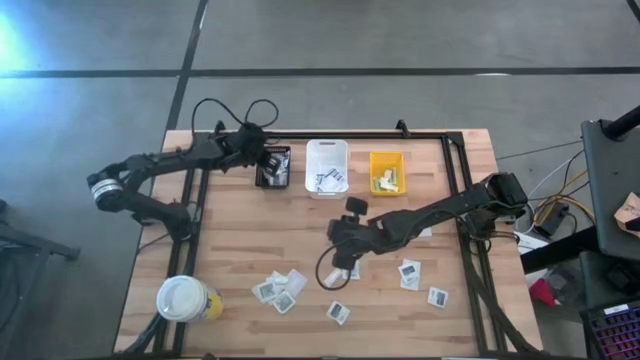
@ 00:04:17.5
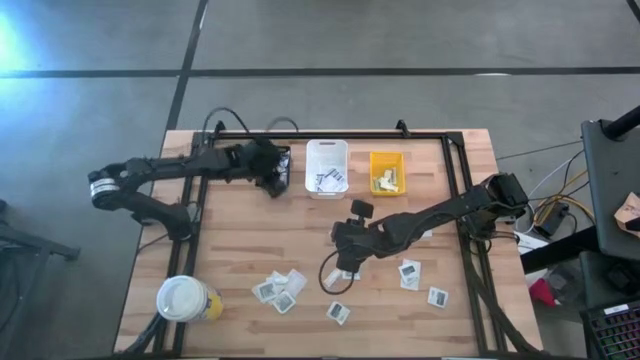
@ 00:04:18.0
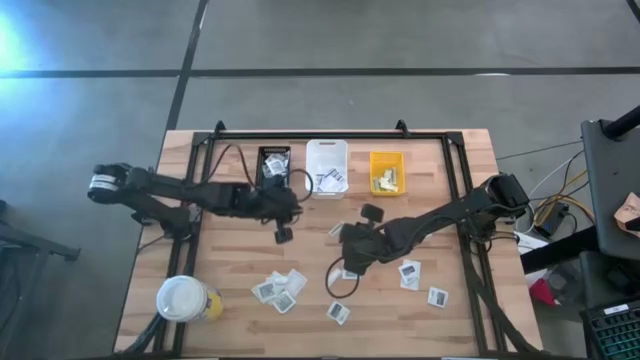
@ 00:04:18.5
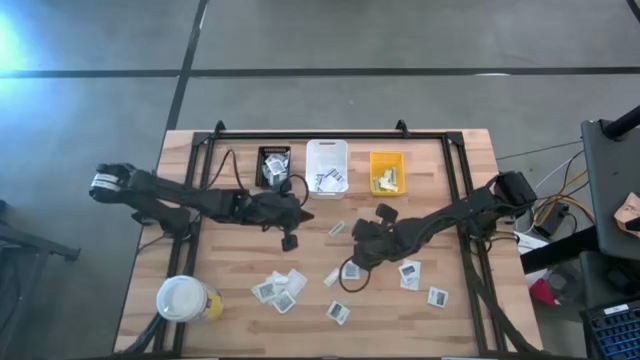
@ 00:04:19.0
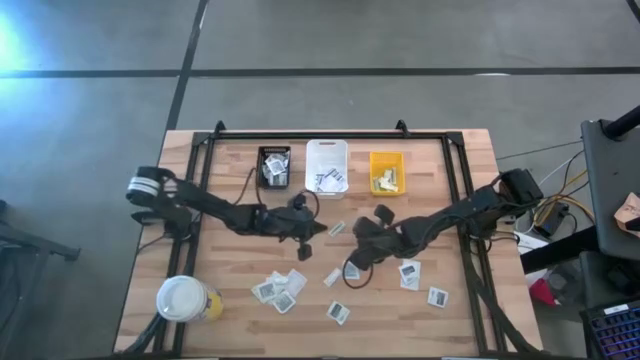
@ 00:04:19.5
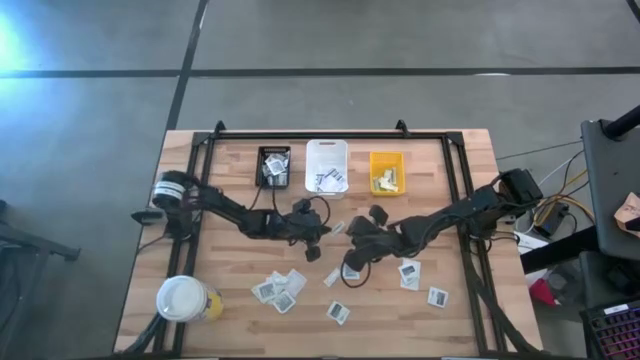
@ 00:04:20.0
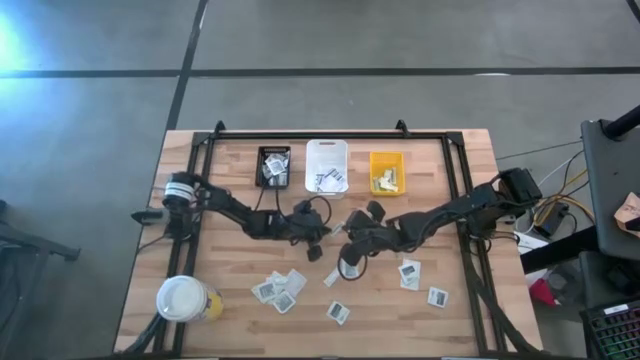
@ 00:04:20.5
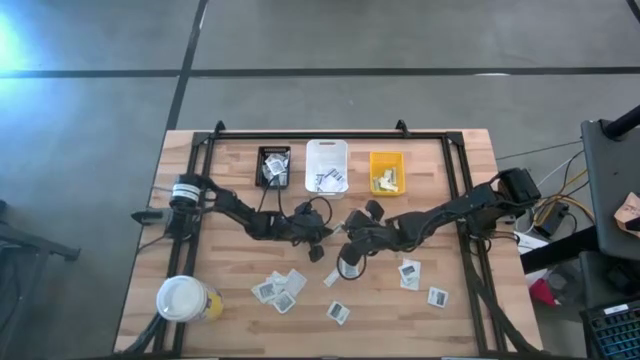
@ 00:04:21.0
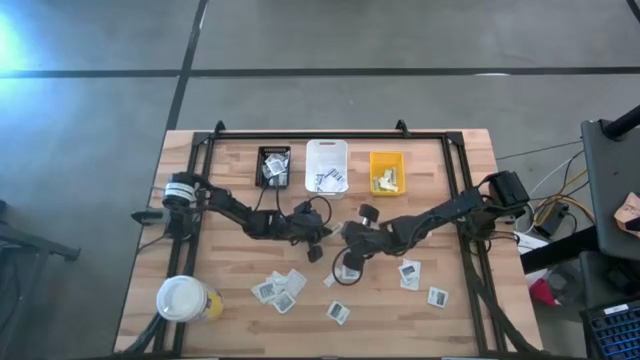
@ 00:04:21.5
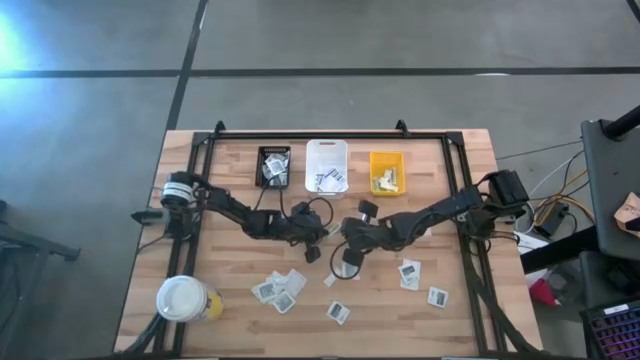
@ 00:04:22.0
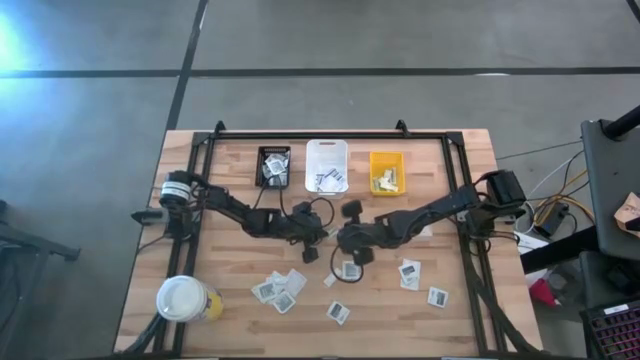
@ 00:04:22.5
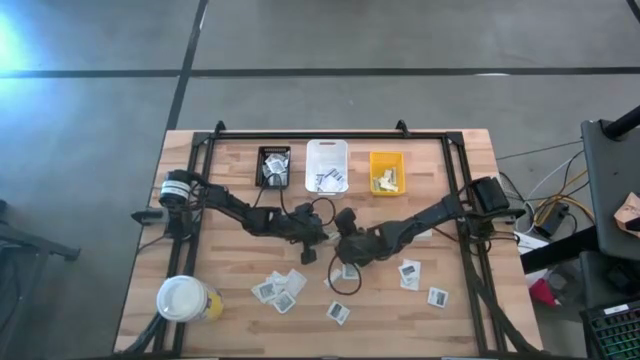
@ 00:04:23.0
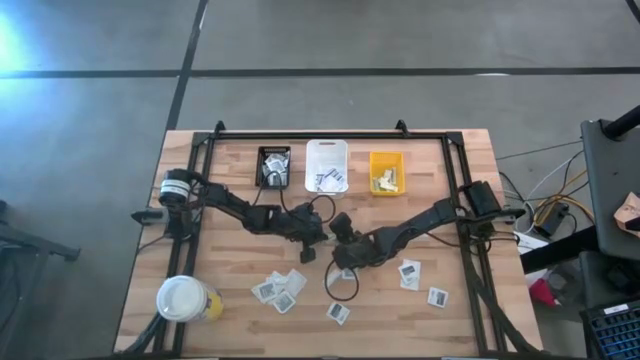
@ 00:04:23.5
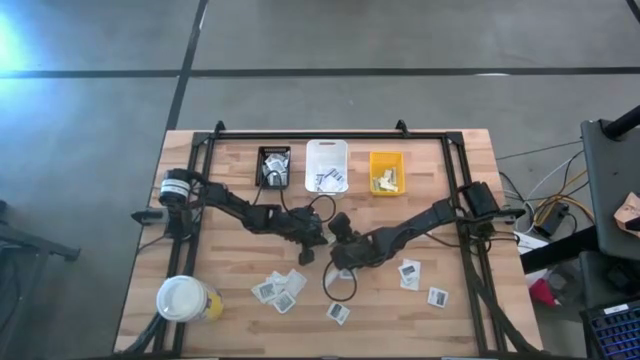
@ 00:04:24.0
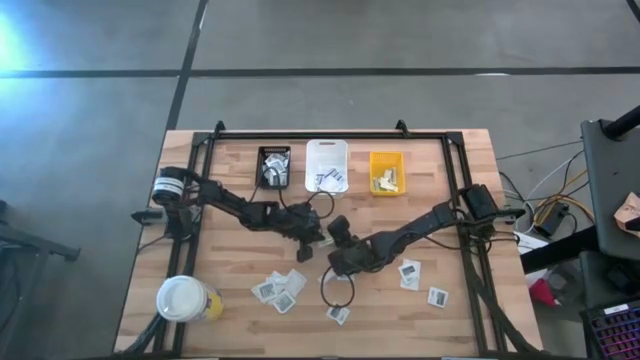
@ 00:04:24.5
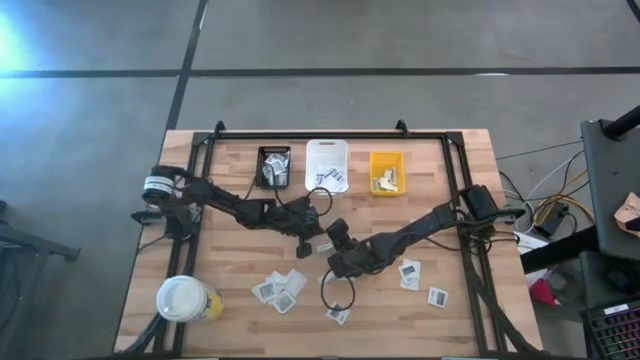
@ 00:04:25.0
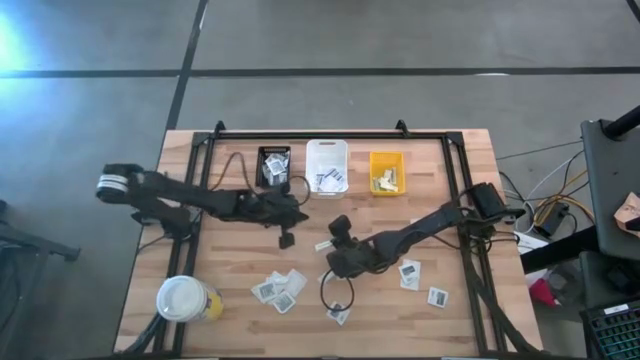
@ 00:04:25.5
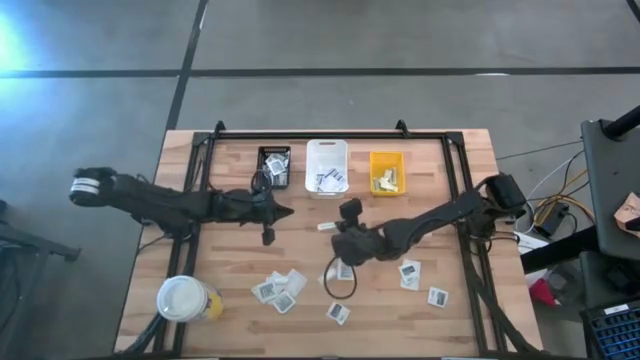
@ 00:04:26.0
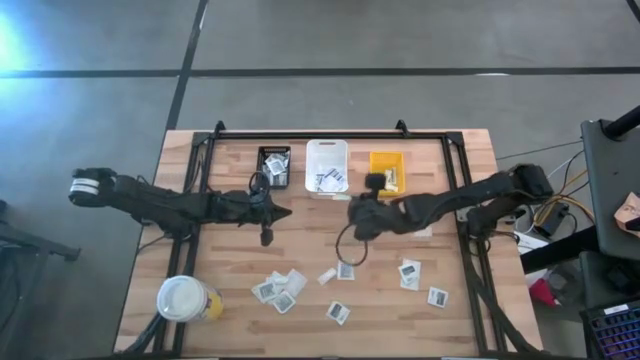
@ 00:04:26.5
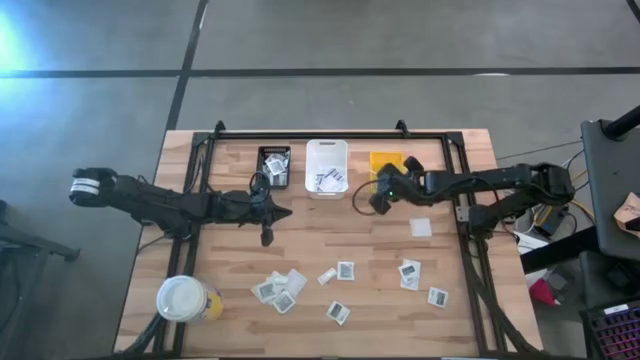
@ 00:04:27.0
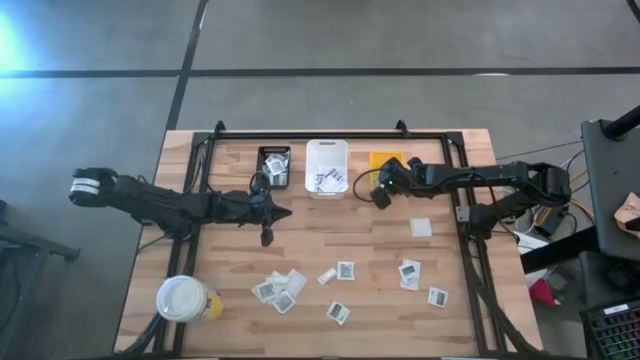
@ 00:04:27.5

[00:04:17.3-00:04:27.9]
Task: Pick & Place First Aid Supplies
Put the green bandage into the yellow basket

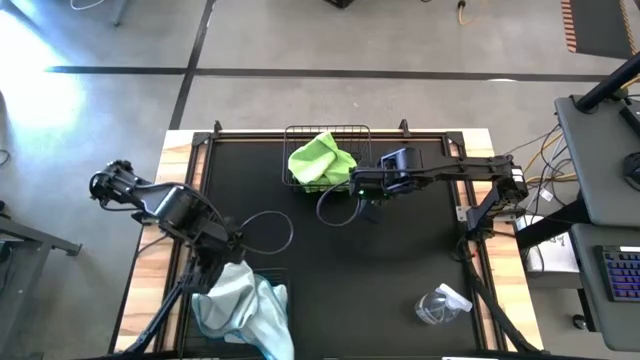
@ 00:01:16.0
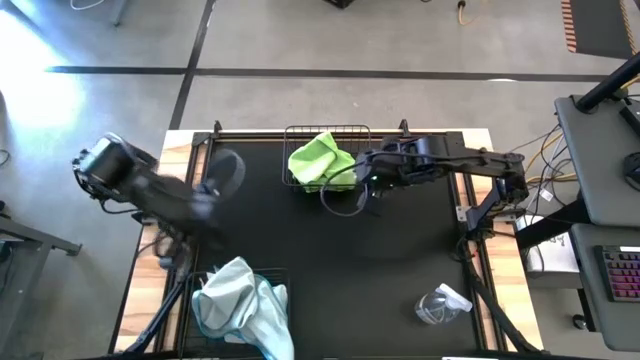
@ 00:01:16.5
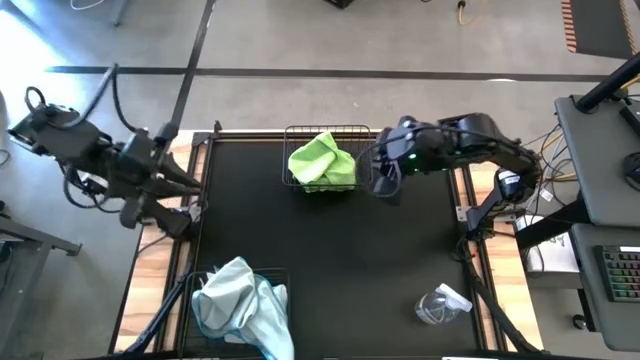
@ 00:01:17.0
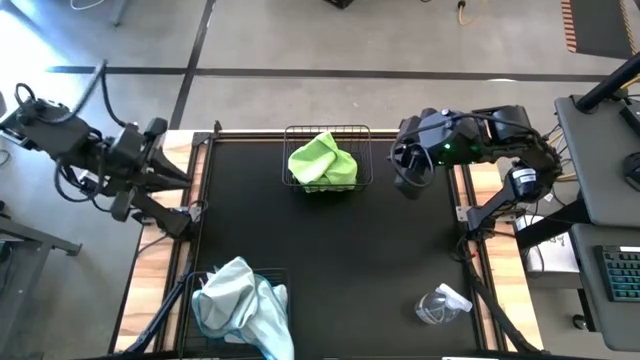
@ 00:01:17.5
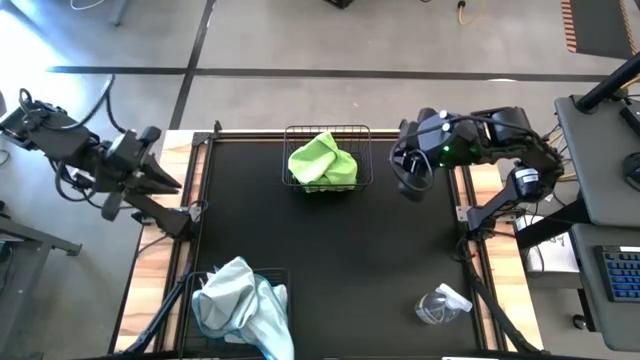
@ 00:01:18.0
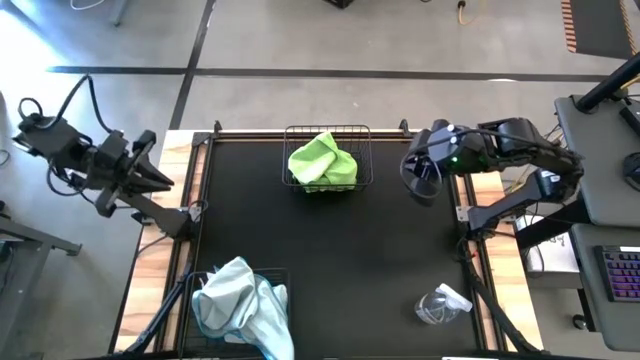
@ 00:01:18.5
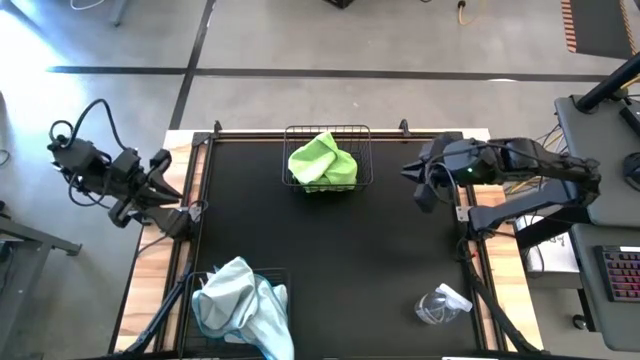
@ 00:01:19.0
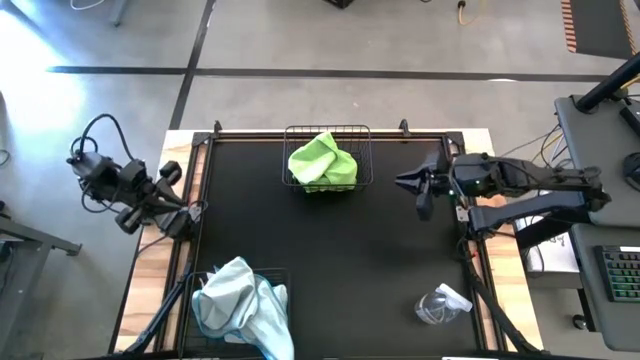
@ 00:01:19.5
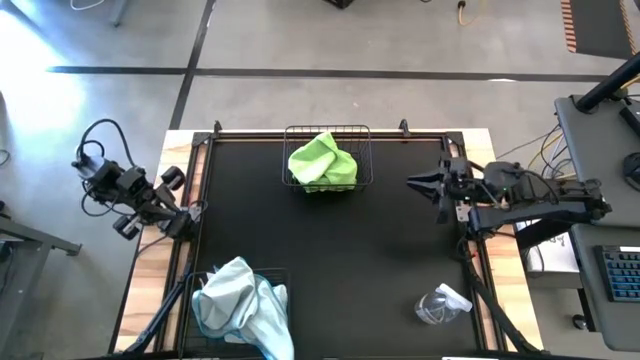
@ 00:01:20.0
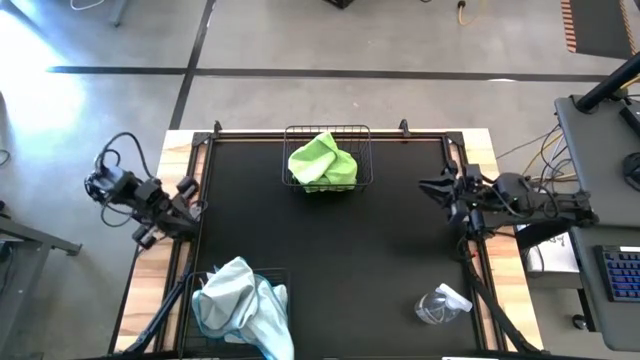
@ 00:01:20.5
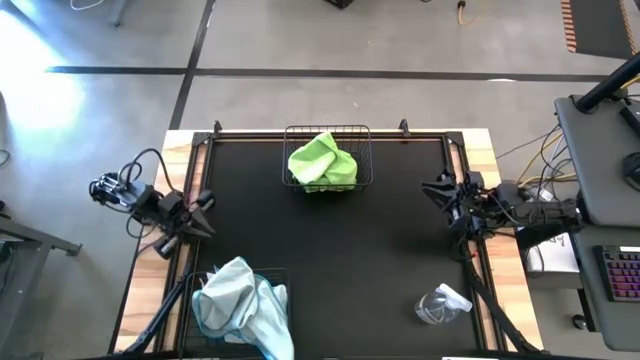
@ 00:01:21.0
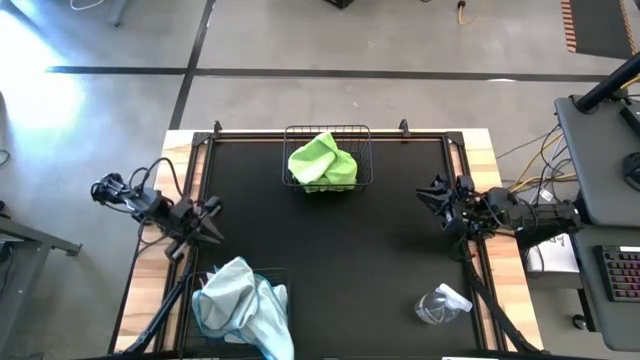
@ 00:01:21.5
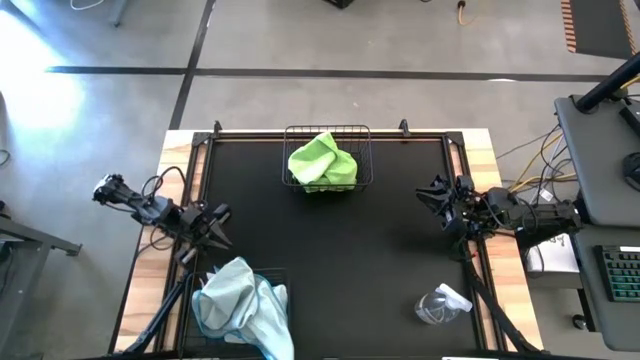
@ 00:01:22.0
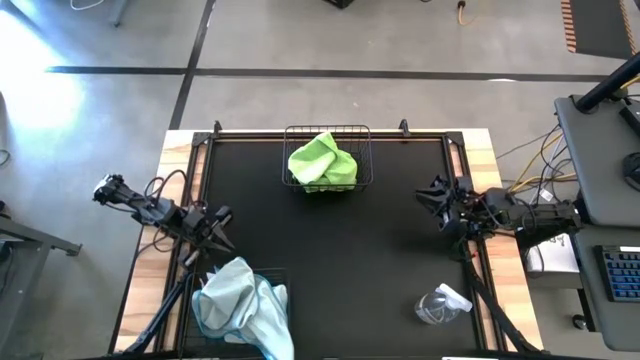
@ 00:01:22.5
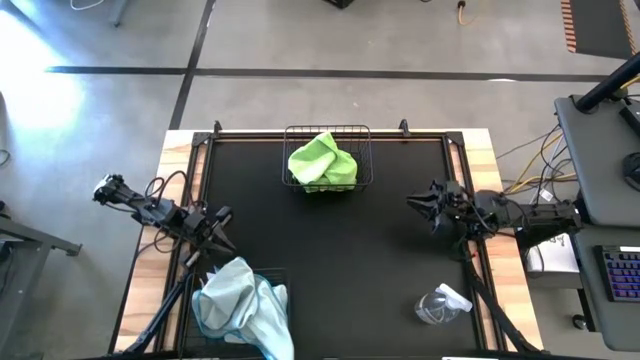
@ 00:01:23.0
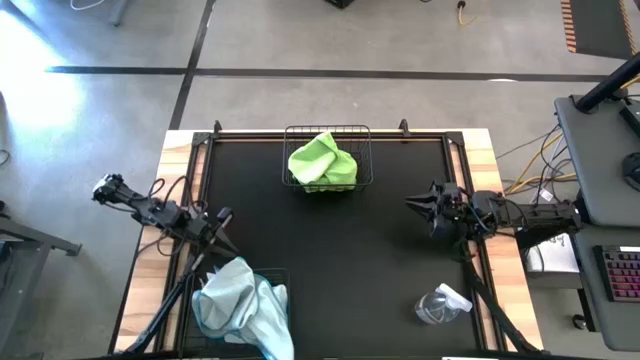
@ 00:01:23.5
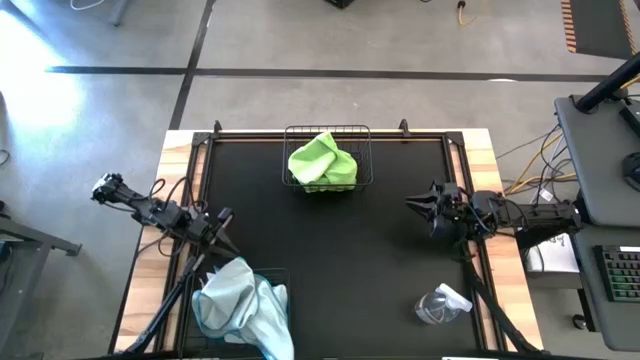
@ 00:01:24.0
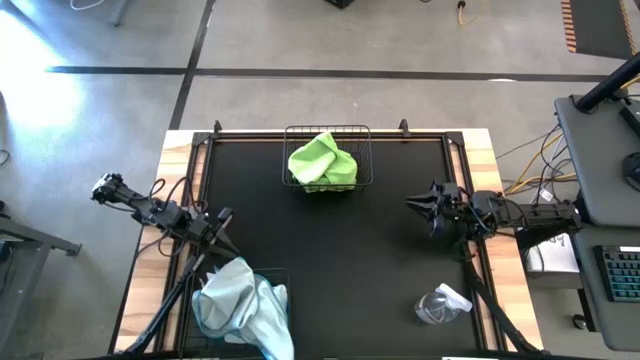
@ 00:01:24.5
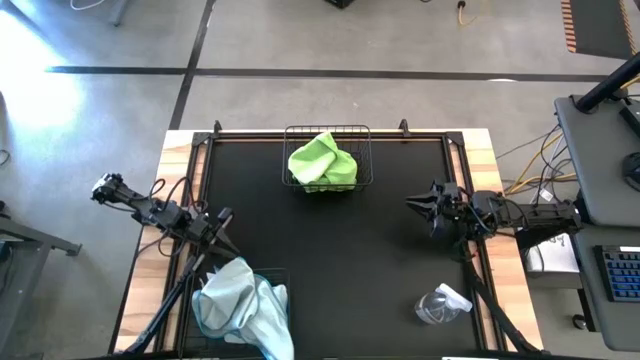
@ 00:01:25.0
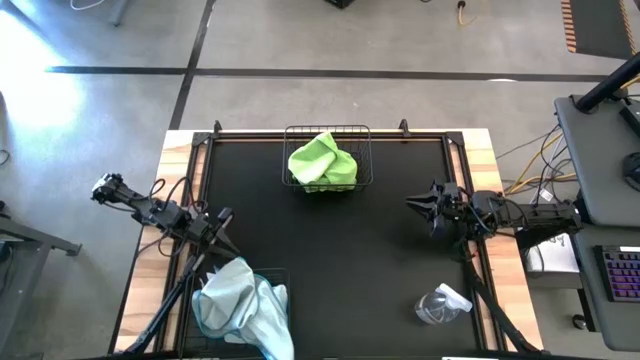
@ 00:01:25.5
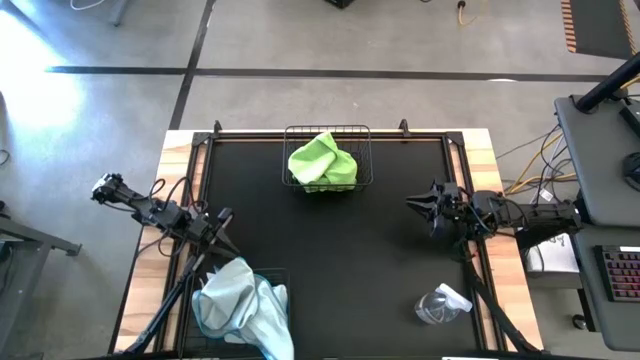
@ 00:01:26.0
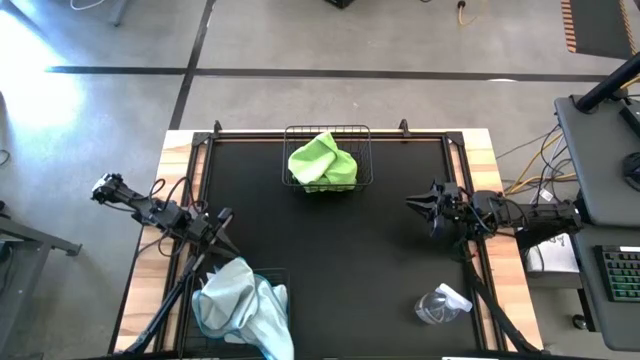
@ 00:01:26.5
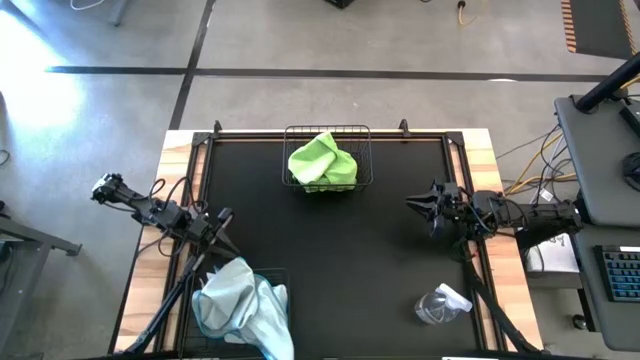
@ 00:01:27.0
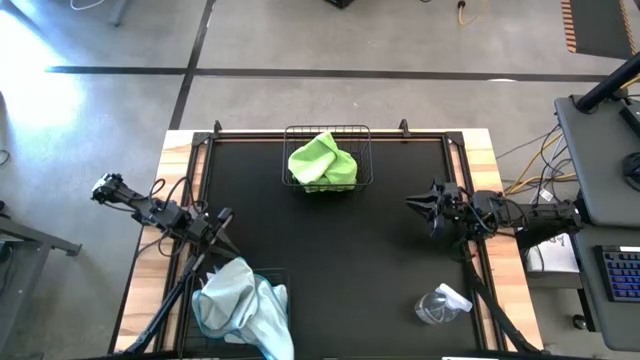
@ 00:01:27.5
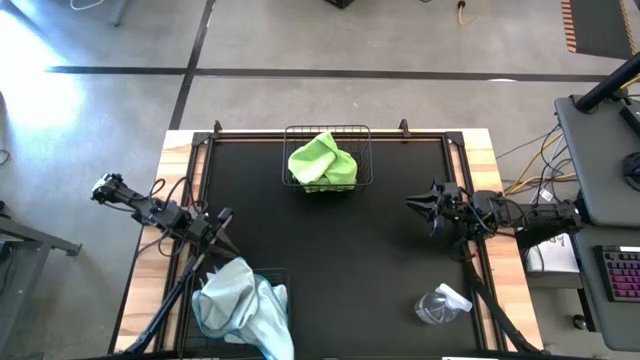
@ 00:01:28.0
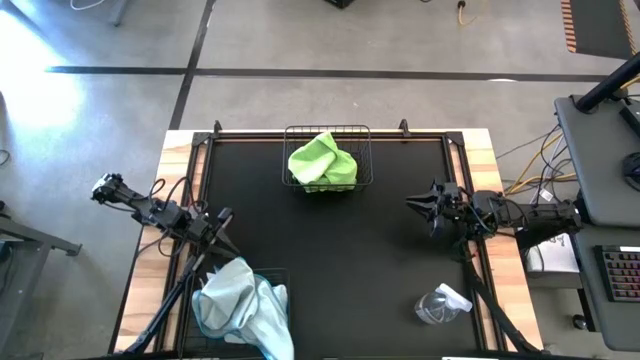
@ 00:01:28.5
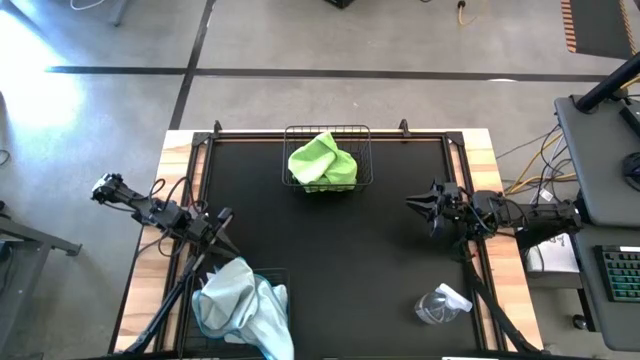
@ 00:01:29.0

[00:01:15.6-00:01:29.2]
Task: Sort microfiber towel by color & place in baskets
Return to Home Position
